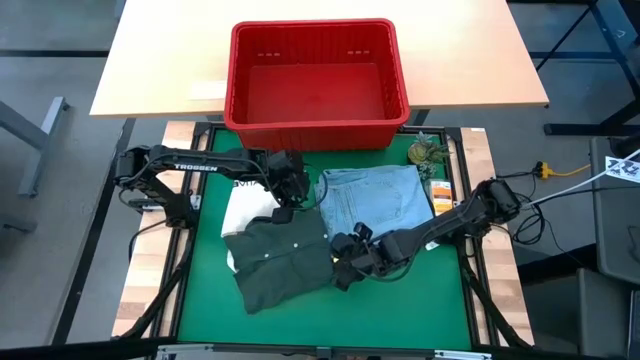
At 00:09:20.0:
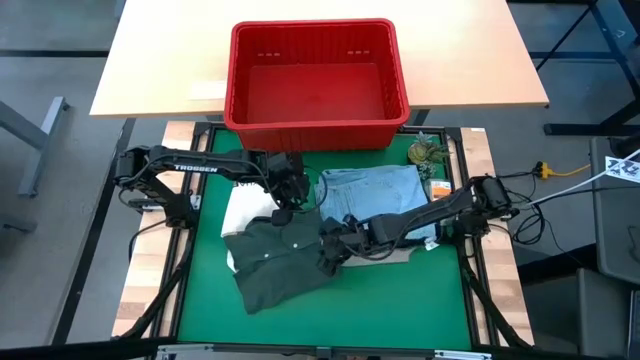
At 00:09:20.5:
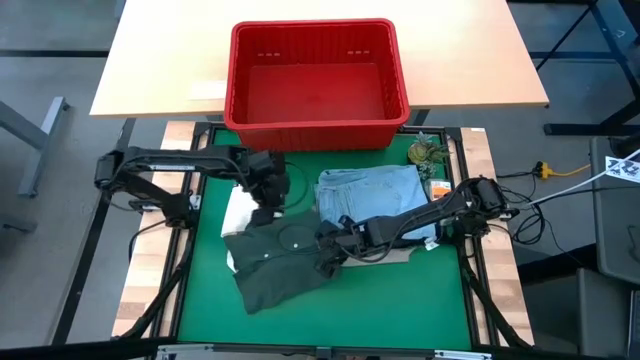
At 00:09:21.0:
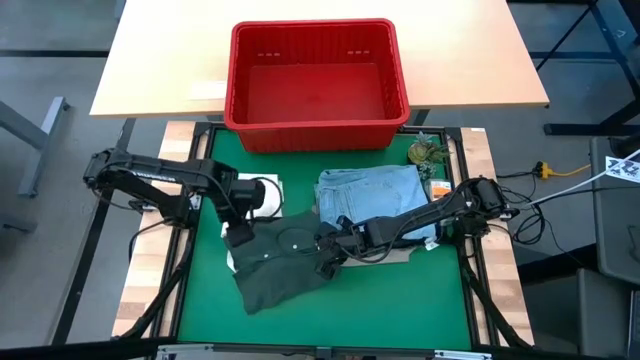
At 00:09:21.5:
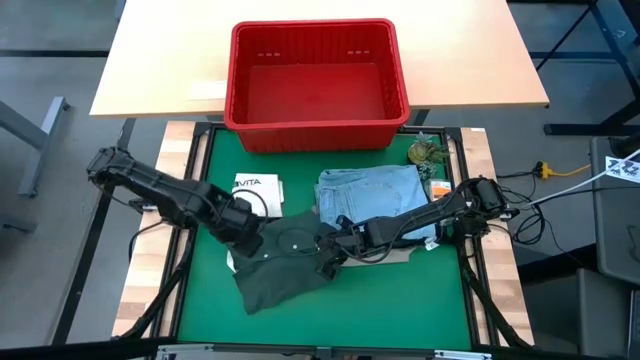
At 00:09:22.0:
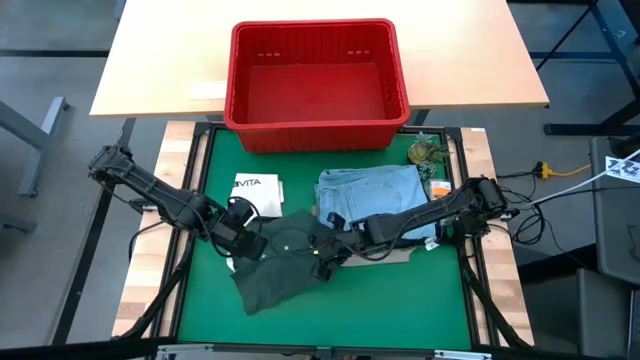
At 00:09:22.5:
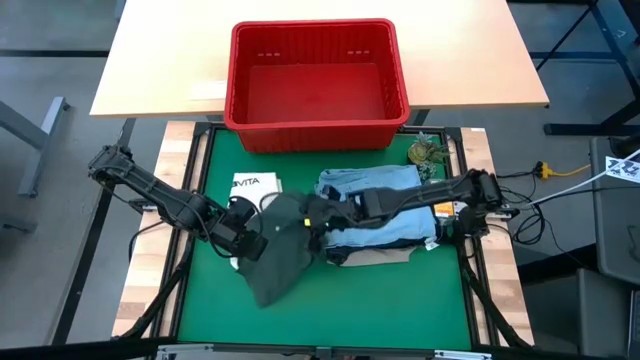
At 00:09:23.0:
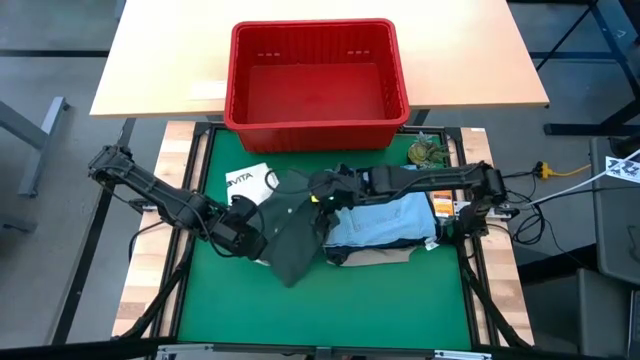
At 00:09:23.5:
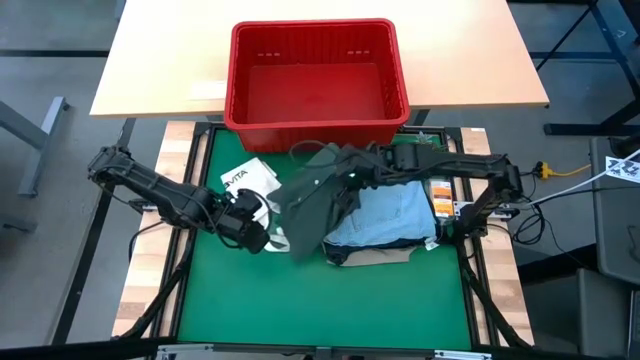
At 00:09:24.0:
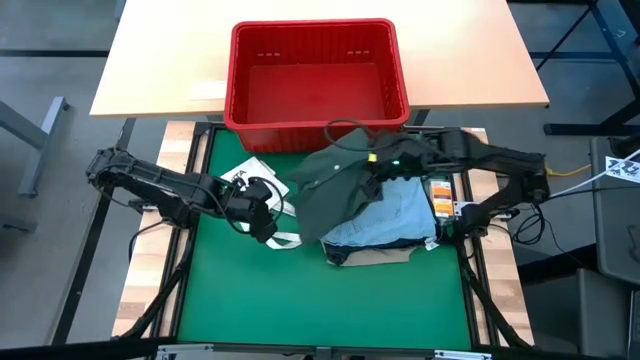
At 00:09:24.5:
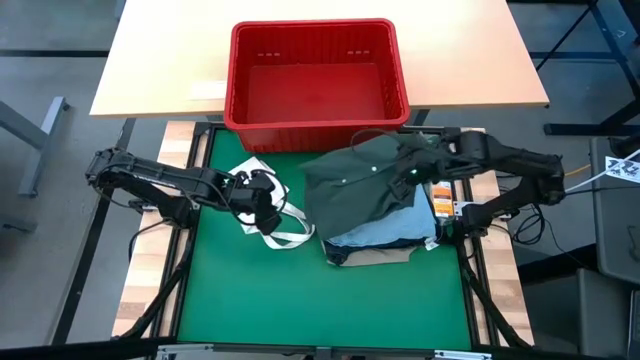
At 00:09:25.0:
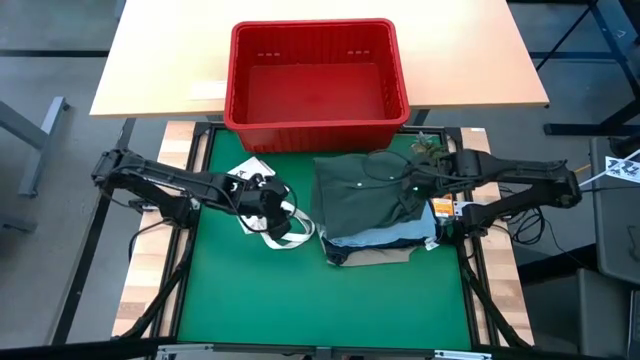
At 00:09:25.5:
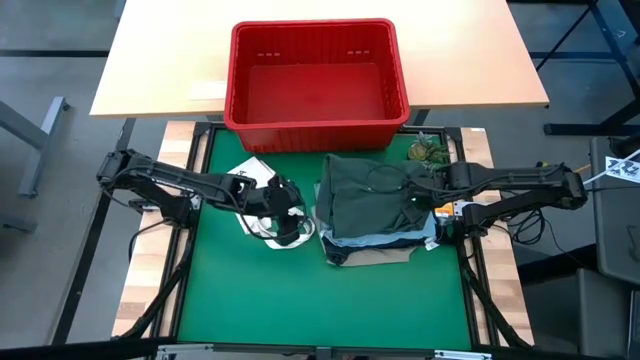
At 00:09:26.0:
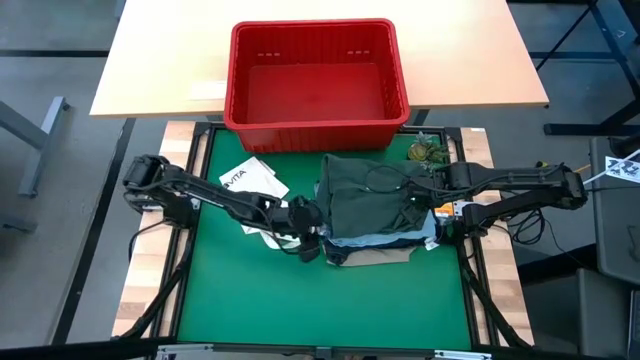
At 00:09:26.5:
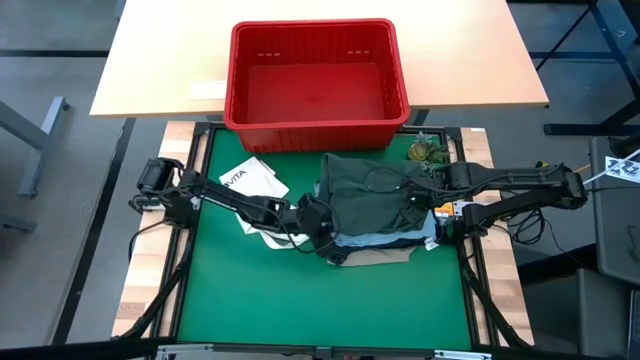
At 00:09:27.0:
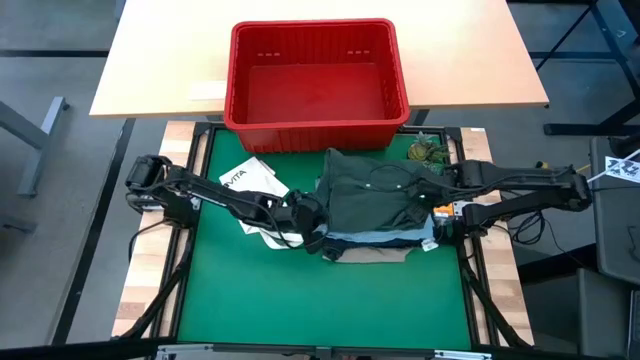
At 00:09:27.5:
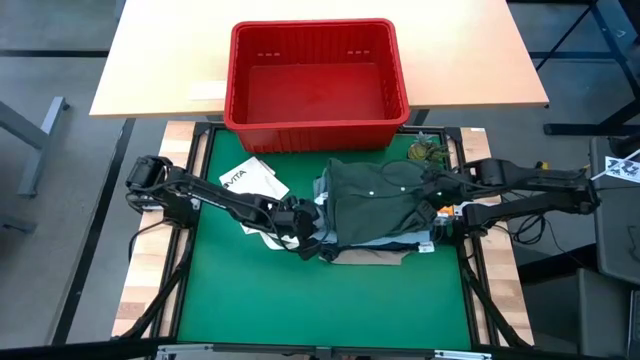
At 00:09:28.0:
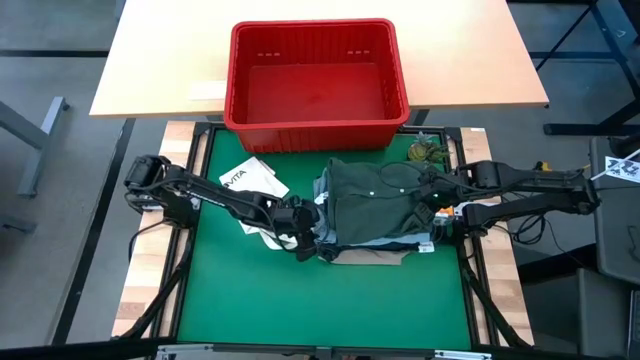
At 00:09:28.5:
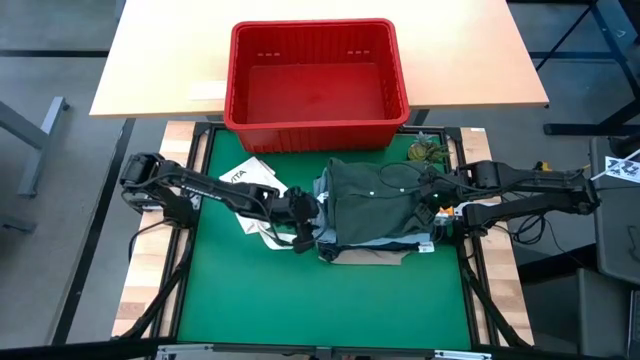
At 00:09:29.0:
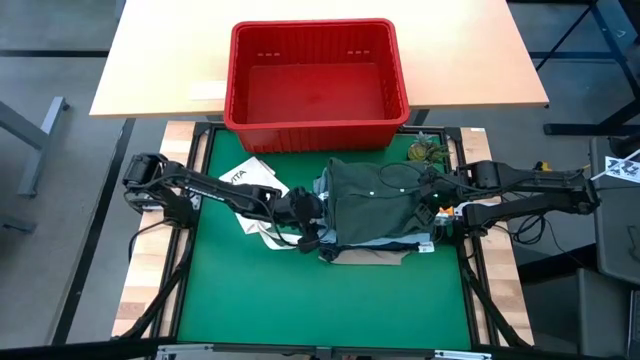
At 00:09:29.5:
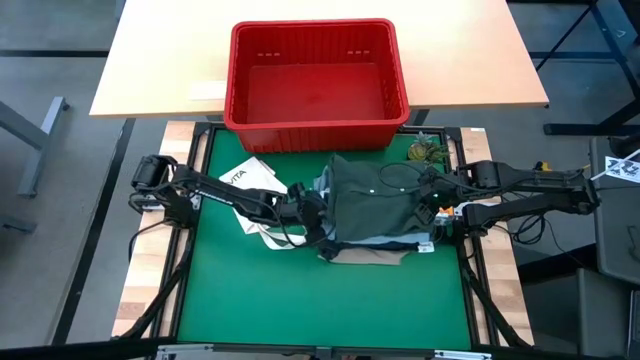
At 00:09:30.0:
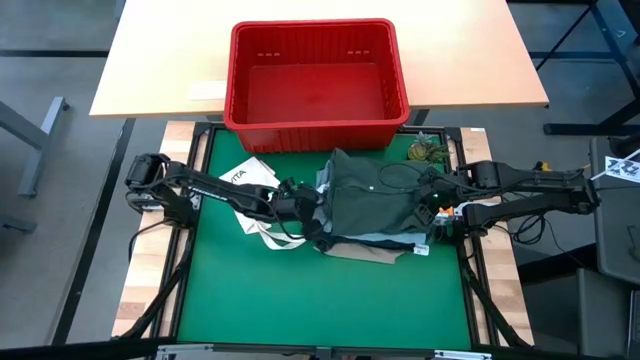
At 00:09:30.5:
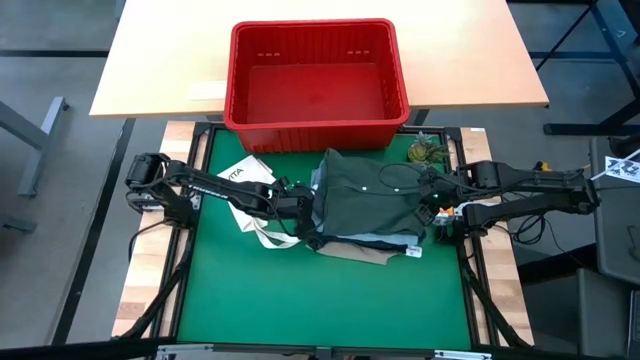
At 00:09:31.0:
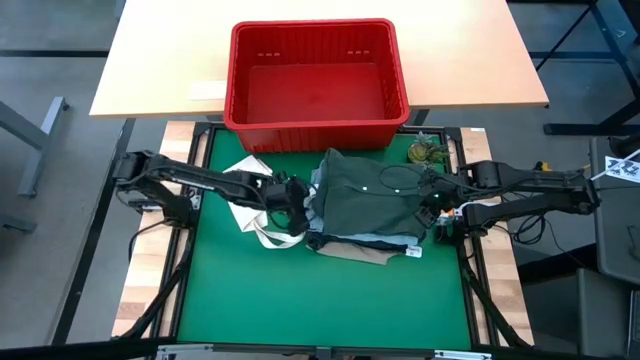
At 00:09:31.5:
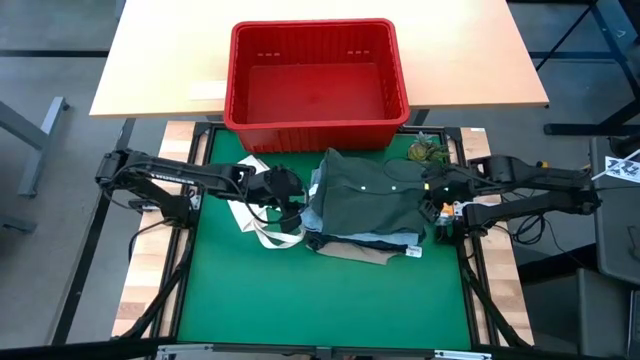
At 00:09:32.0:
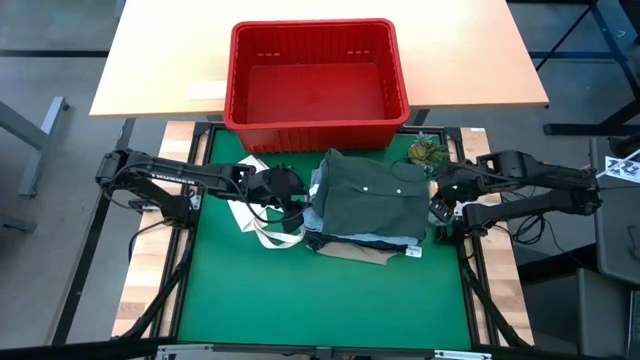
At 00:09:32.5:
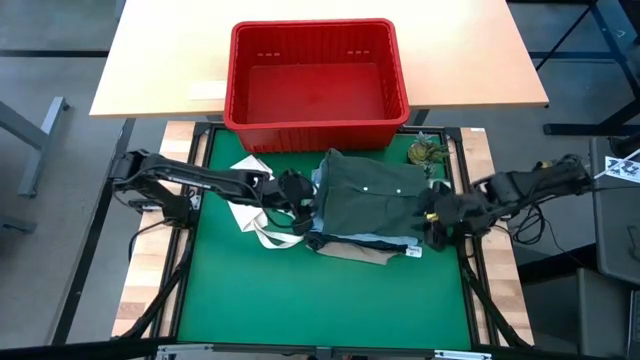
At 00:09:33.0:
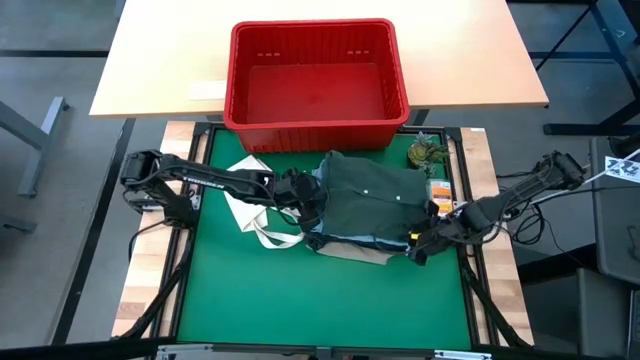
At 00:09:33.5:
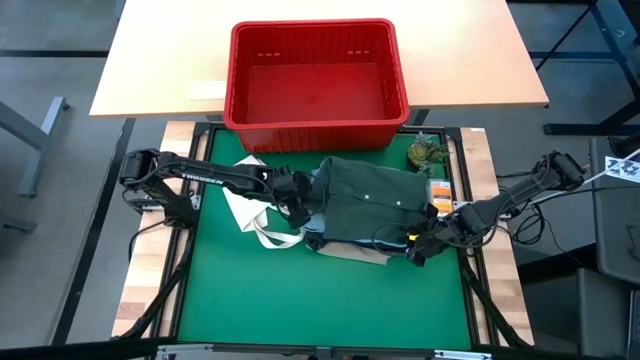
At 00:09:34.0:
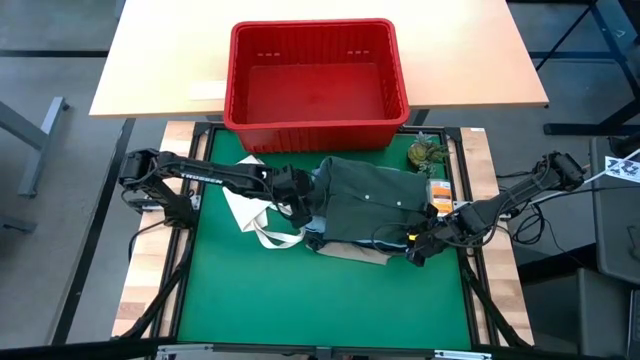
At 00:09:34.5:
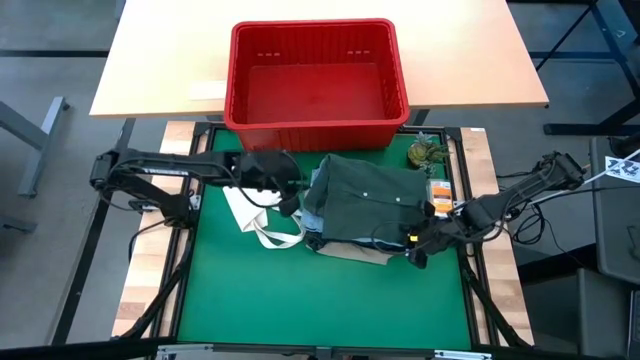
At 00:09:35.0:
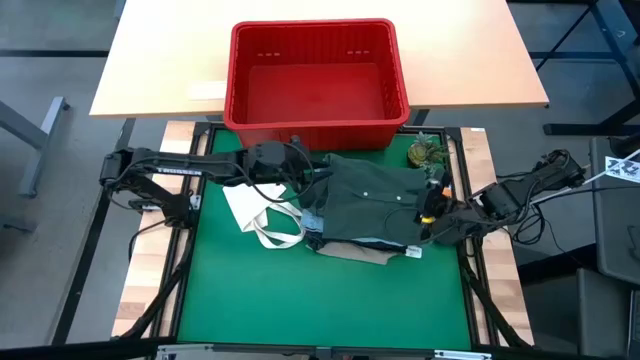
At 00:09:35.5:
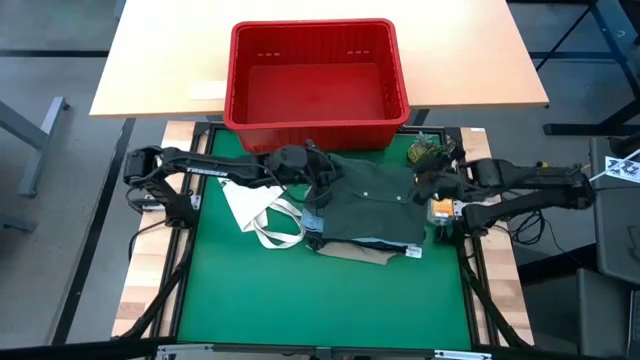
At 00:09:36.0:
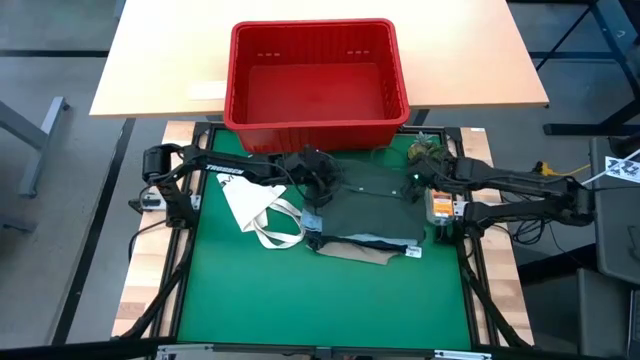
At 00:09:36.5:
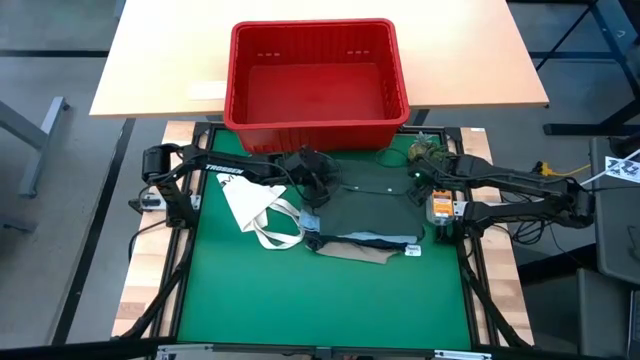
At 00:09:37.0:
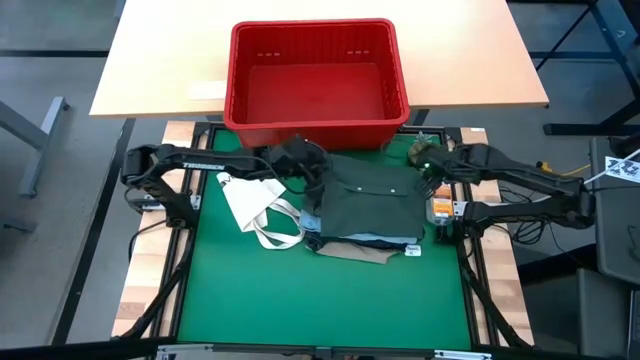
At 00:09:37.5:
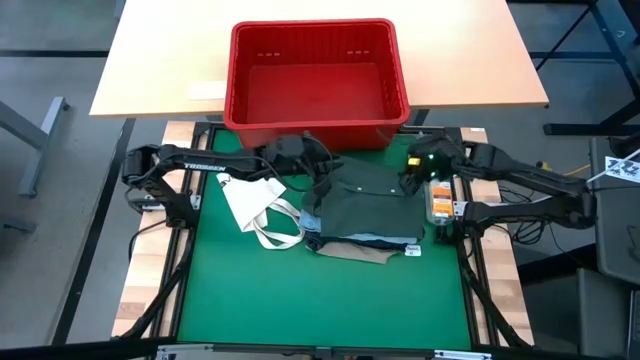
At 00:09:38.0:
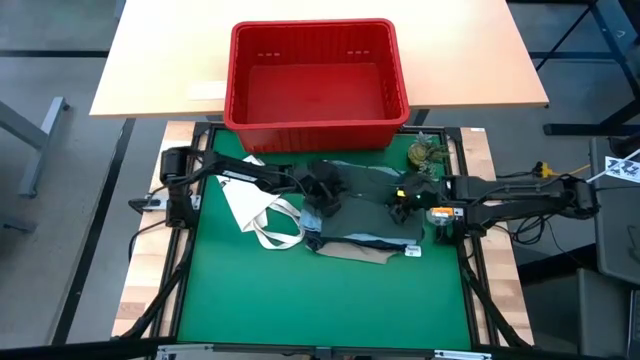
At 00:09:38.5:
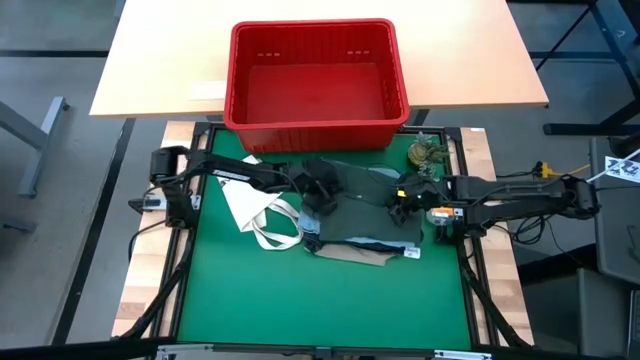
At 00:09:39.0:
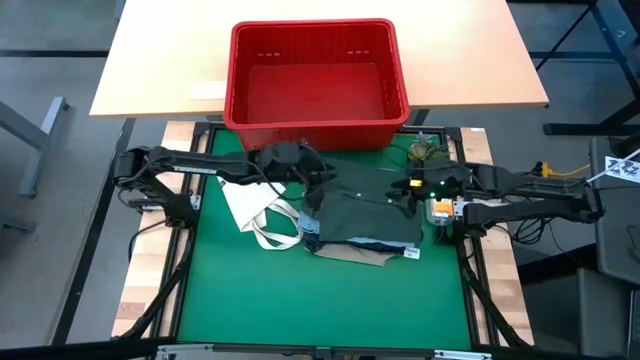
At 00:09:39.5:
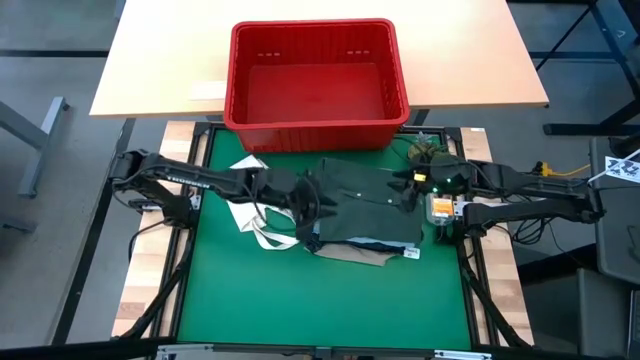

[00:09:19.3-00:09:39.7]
Task: Fold Laundry from Bin
Stack the green shirt on top of the light blue jeans

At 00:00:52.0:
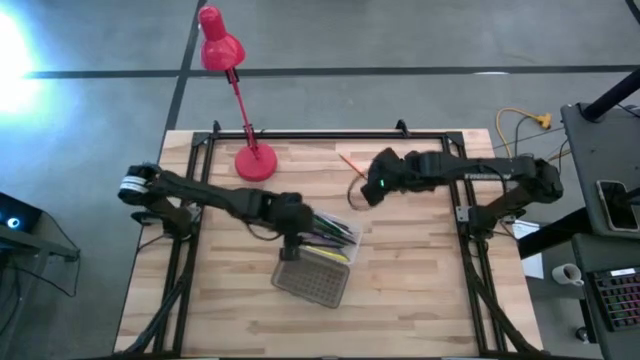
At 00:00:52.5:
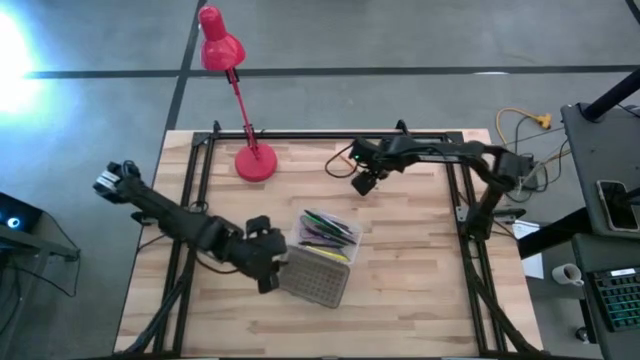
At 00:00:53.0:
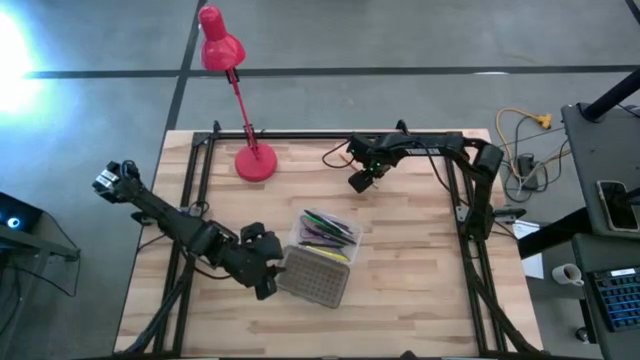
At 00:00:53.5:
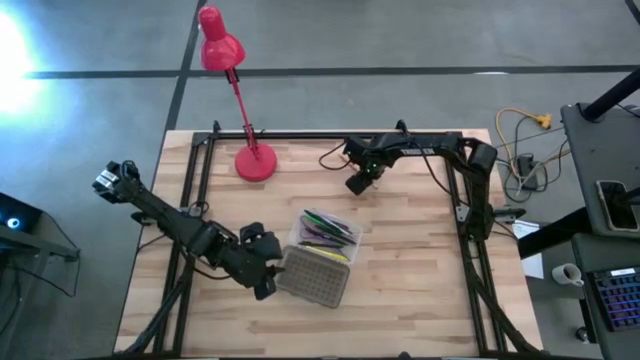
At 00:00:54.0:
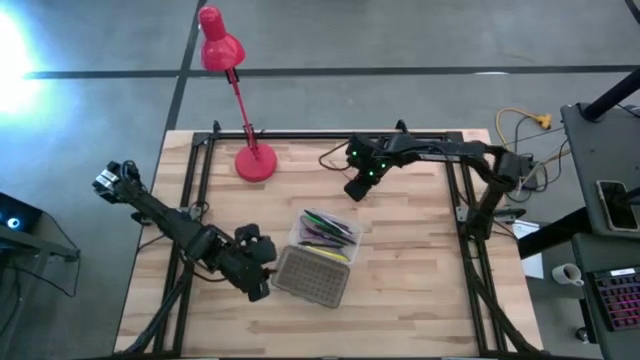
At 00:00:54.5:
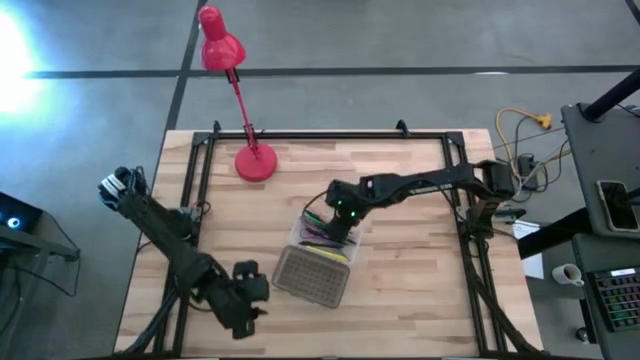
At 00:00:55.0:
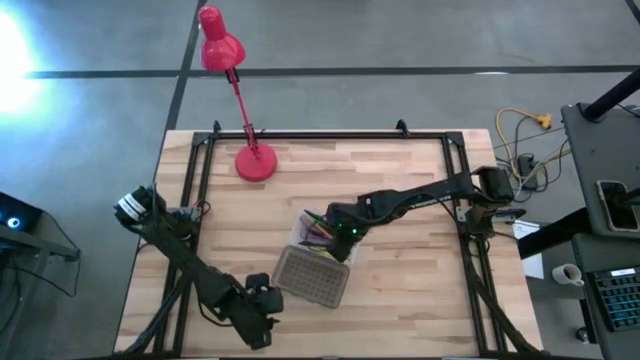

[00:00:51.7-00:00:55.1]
Task: Pick & place school supplies into a supply box
Put the orange pen into the supply box
